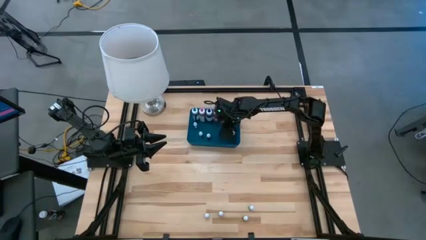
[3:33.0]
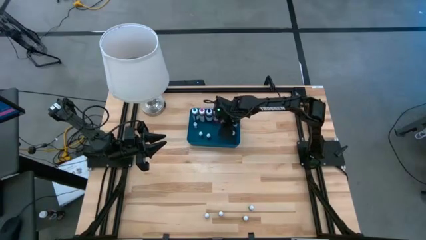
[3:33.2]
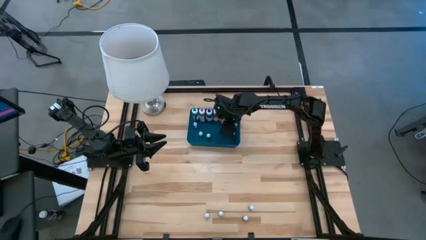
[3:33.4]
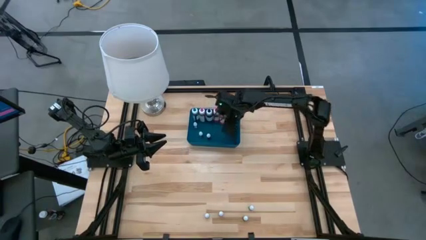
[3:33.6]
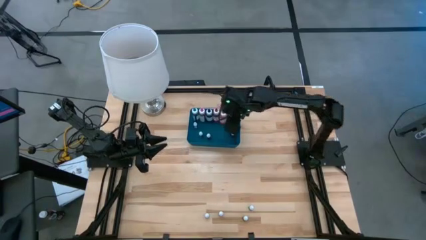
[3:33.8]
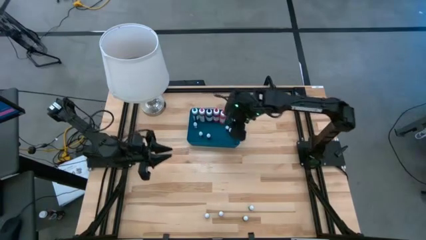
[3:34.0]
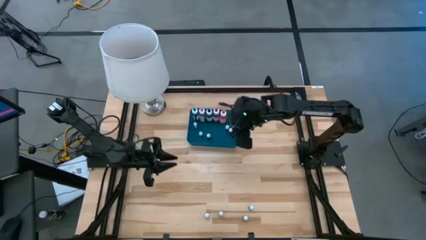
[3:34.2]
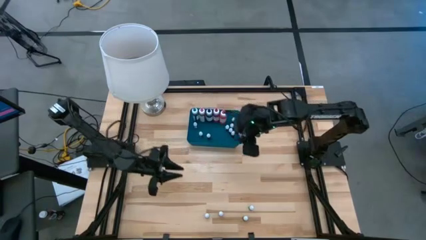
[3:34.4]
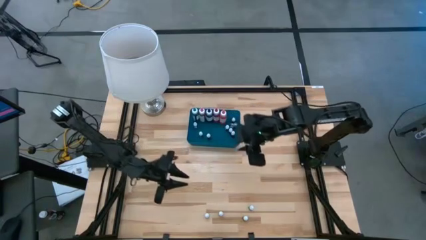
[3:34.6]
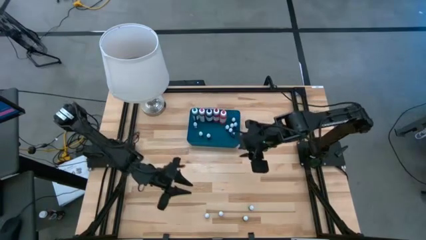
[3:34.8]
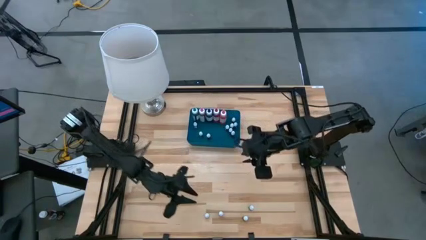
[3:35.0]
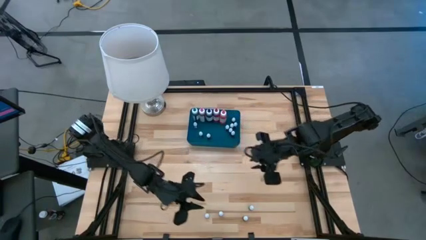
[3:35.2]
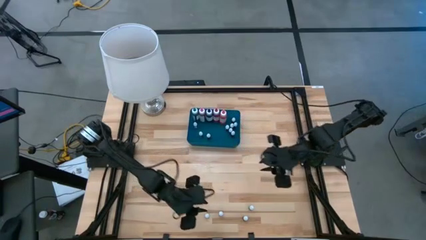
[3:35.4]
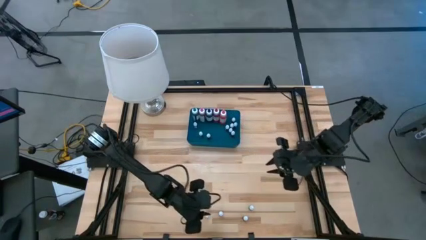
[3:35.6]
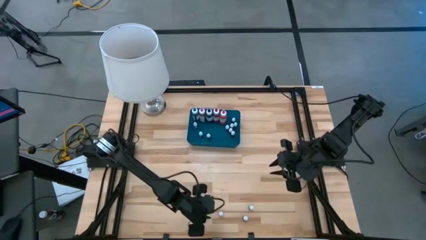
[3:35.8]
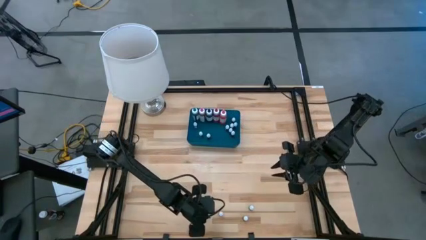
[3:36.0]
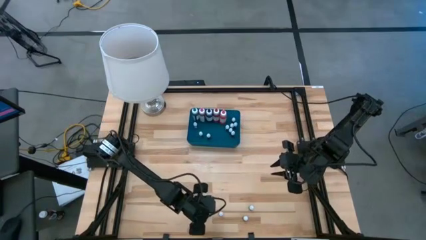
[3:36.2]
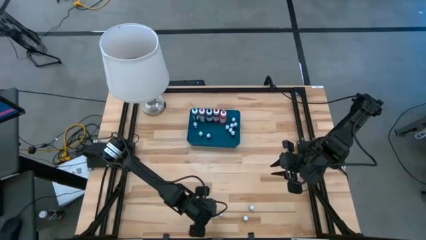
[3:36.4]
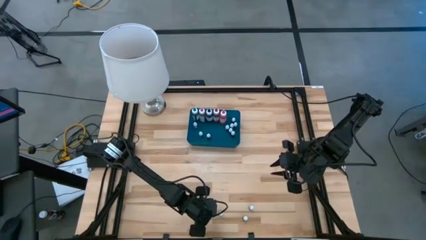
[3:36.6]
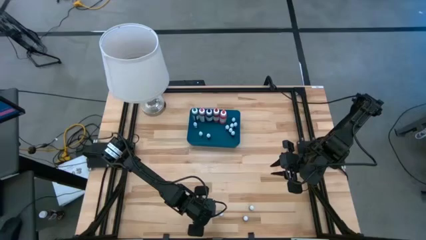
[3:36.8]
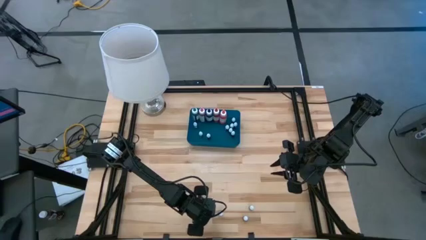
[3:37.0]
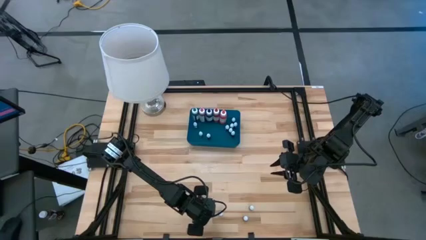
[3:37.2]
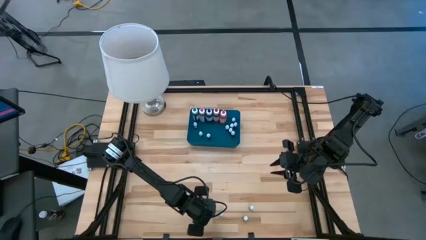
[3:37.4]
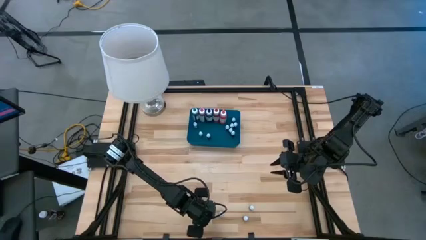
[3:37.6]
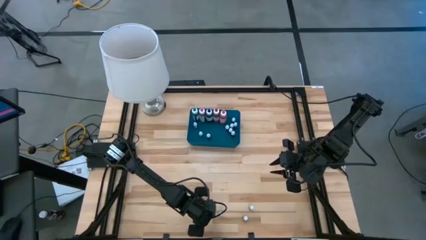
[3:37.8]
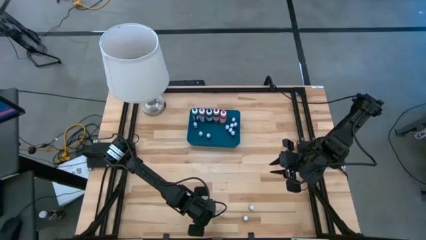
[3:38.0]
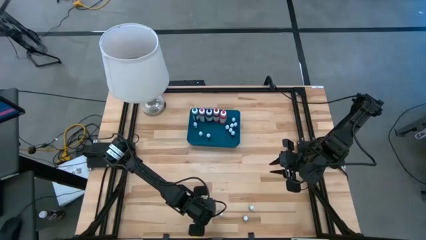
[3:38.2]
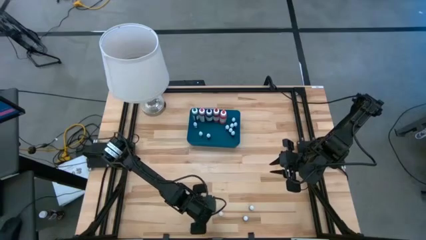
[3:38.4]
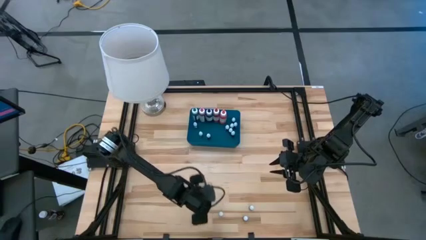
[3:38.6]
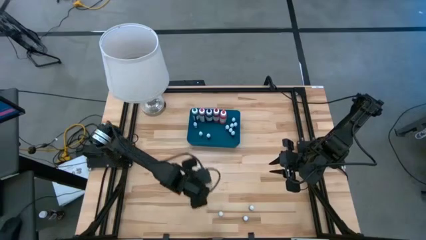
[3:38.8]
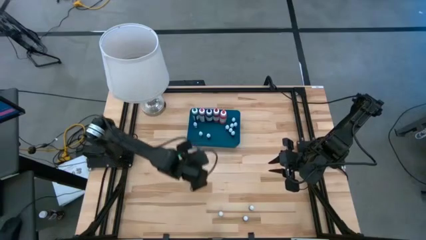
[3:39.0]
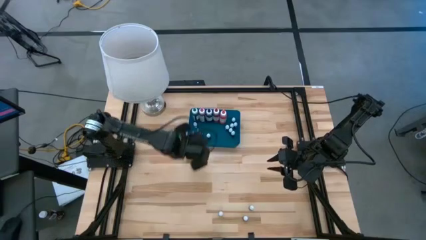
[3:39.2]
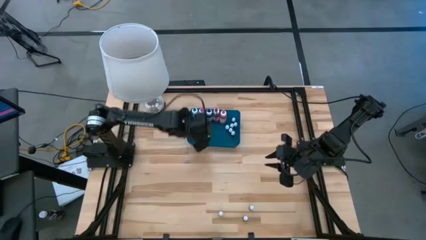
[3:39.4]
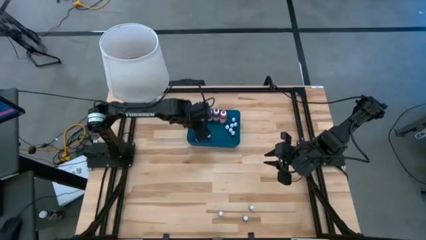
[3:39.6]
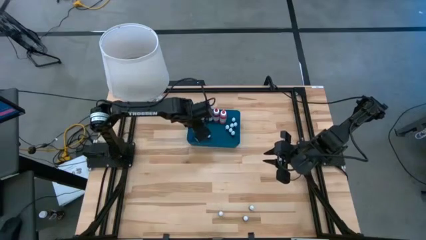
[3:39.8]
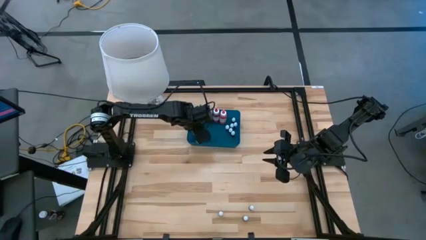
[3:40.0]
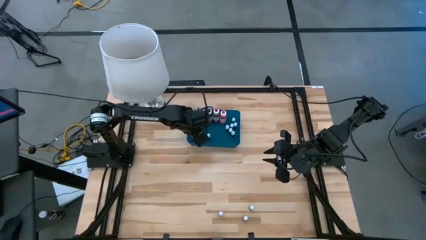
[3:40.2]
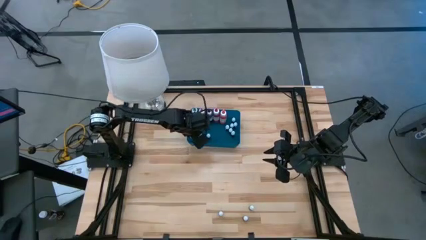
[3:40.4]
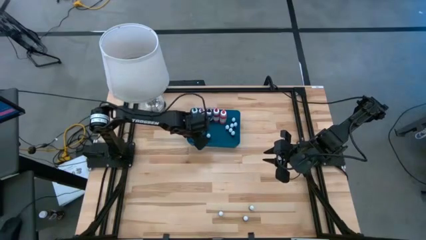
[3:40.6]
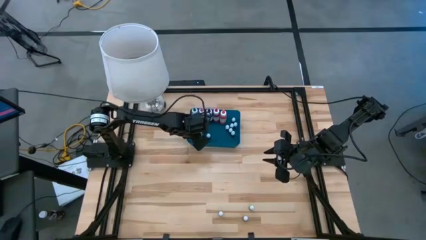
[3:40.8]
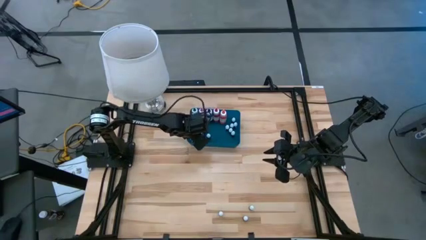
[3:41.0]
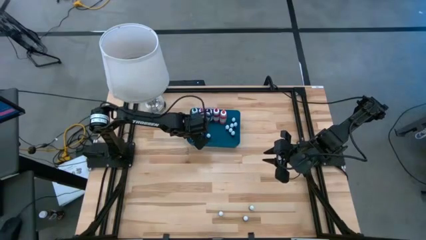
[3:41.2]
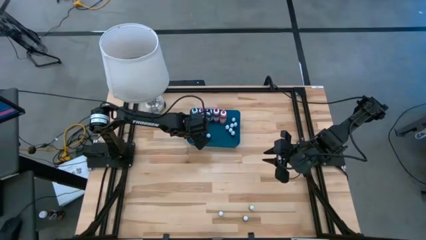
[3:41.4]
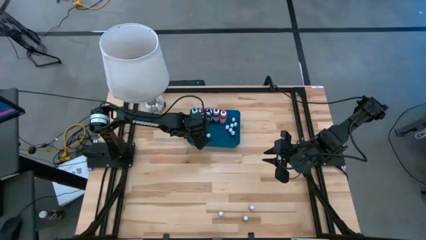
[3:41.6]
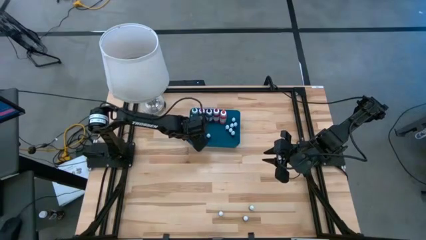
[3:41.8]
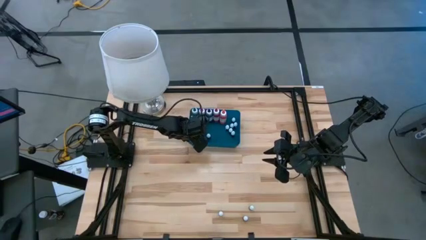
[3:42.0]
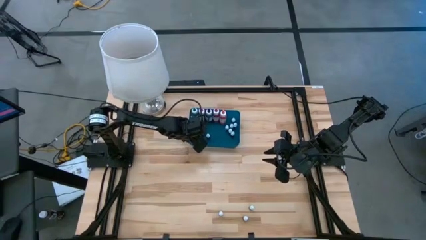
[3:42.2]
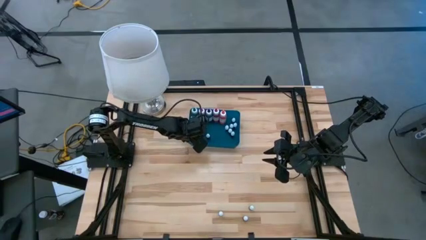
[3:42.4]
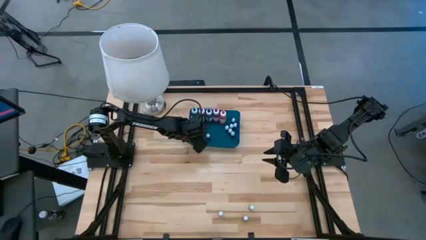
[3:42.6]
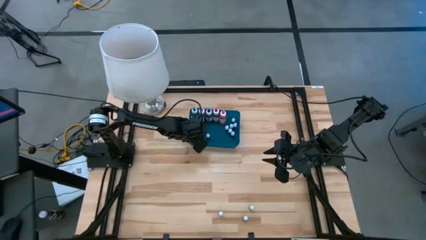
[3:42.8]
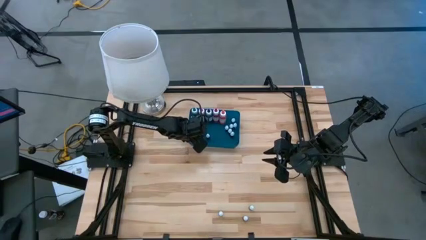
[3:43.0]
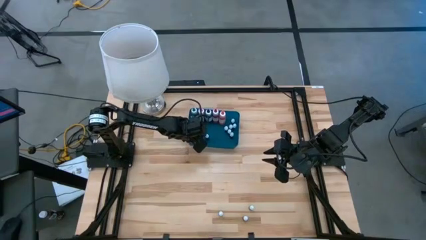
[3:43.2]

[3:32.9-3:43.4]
Task: Pick & Place food coloring
Put the small orange food coloring bottle into the bin
